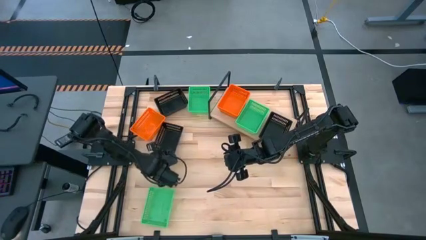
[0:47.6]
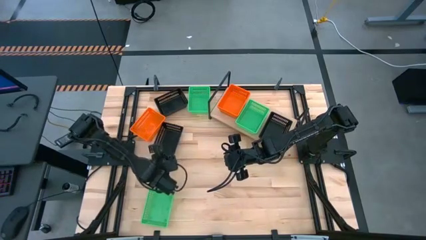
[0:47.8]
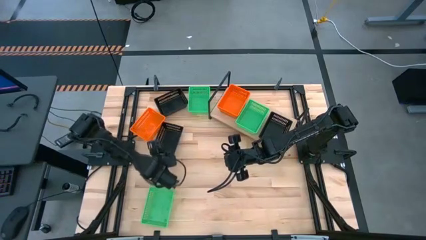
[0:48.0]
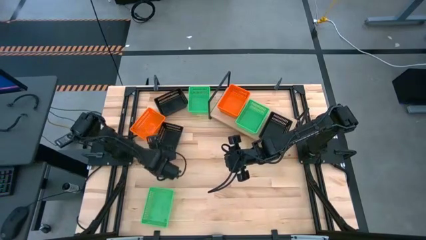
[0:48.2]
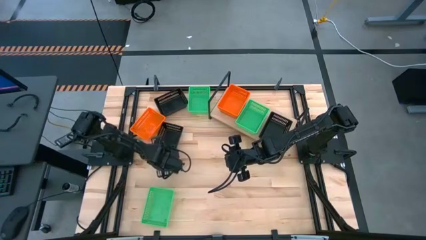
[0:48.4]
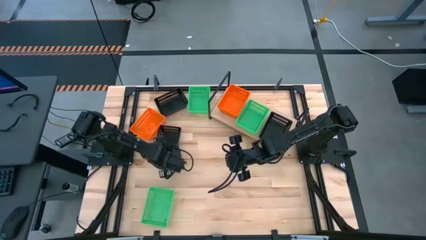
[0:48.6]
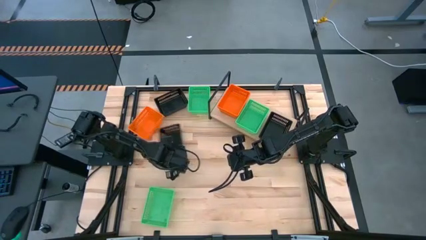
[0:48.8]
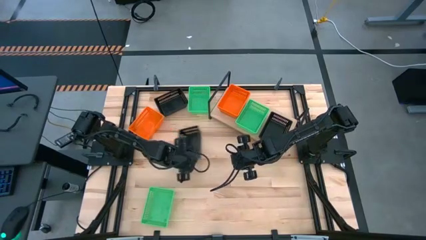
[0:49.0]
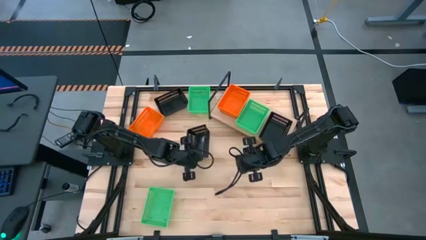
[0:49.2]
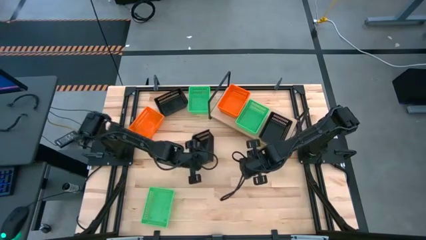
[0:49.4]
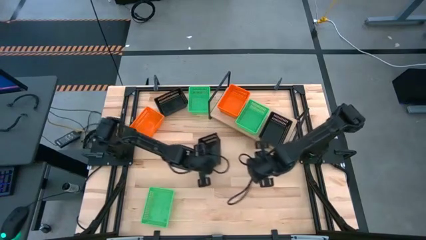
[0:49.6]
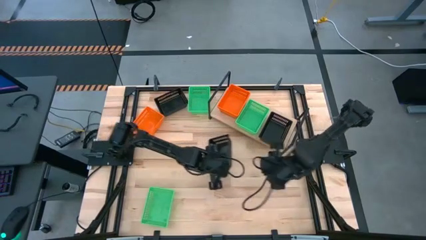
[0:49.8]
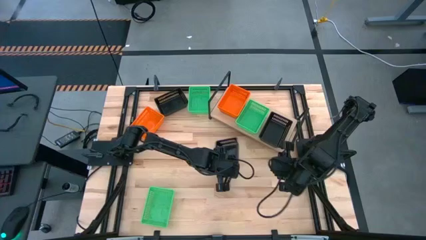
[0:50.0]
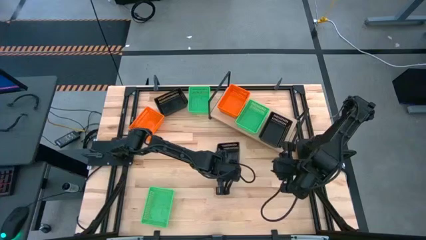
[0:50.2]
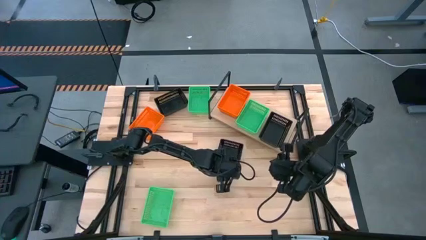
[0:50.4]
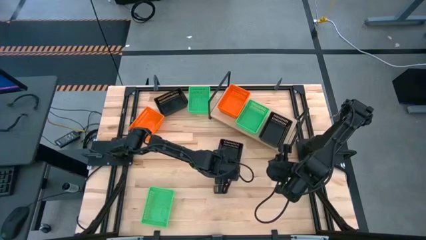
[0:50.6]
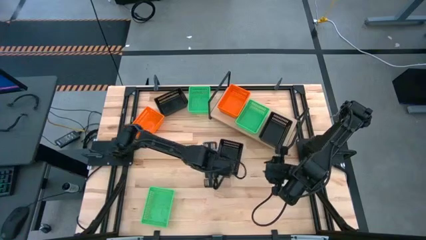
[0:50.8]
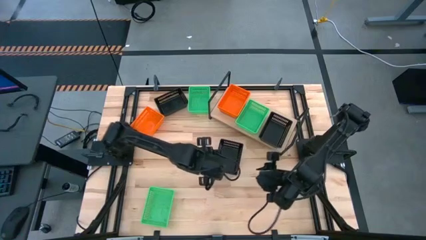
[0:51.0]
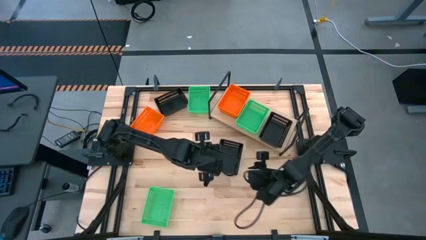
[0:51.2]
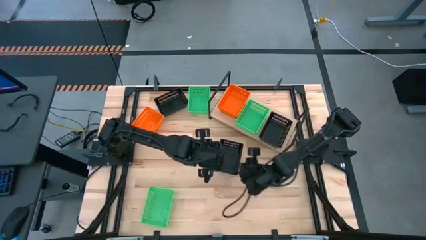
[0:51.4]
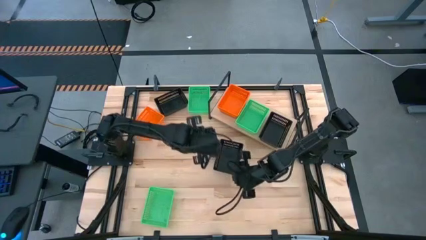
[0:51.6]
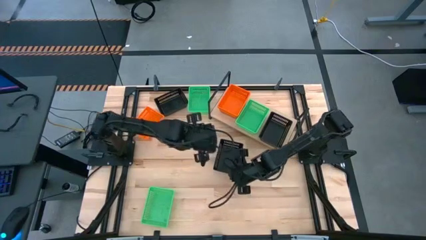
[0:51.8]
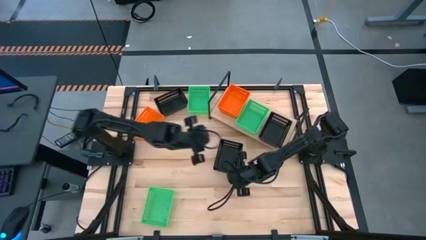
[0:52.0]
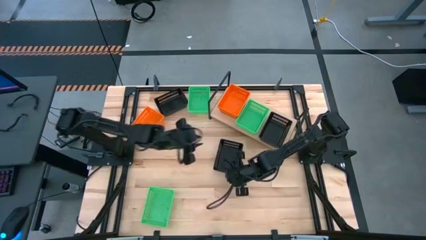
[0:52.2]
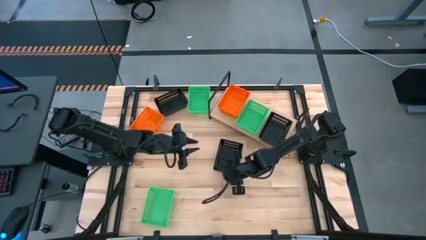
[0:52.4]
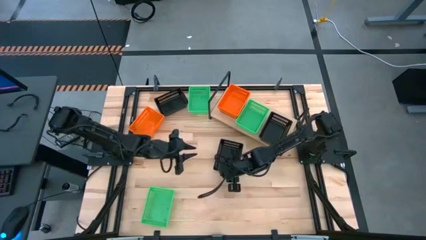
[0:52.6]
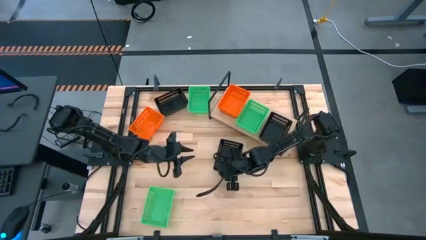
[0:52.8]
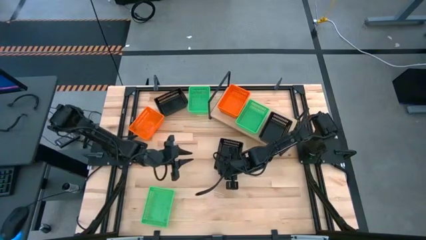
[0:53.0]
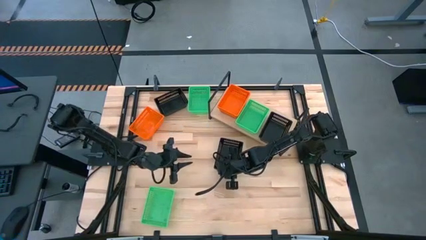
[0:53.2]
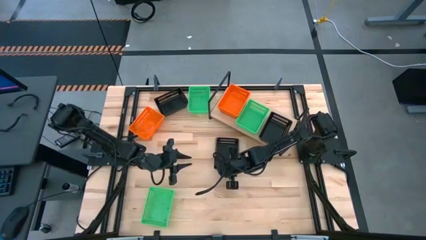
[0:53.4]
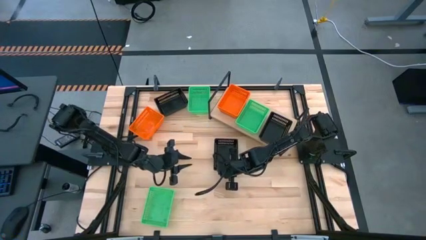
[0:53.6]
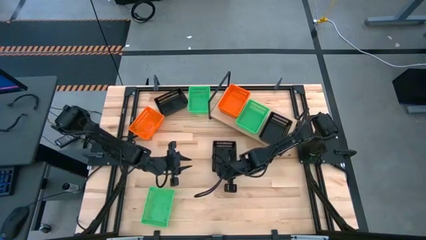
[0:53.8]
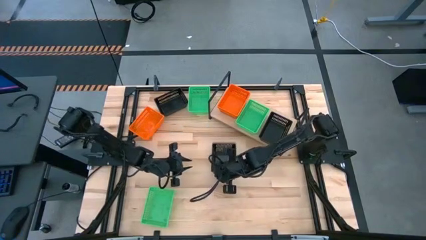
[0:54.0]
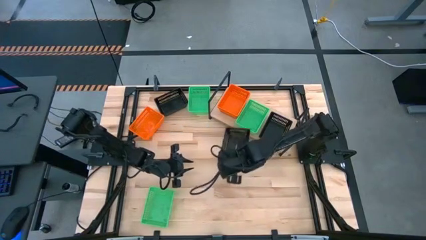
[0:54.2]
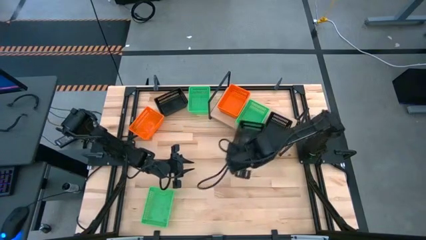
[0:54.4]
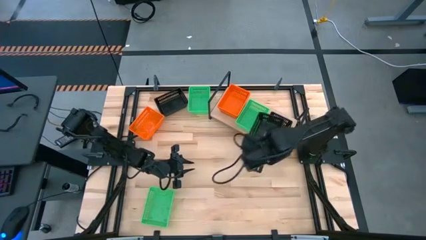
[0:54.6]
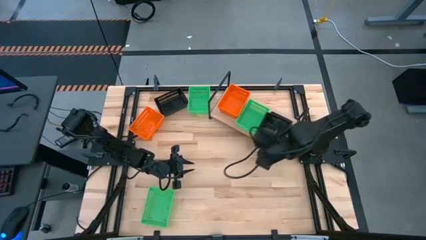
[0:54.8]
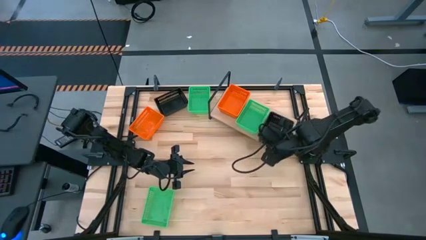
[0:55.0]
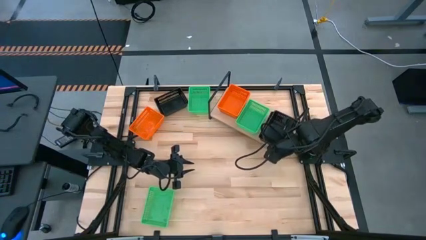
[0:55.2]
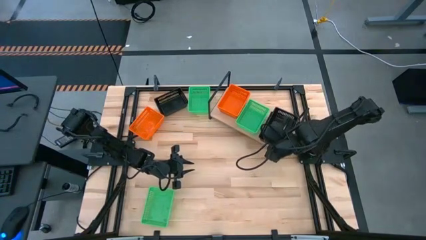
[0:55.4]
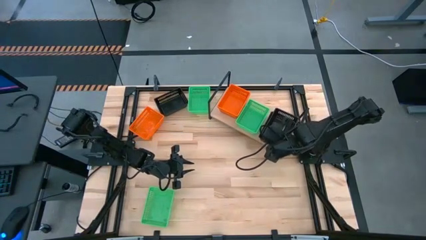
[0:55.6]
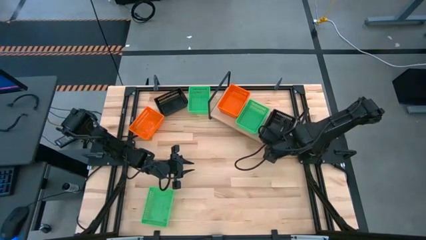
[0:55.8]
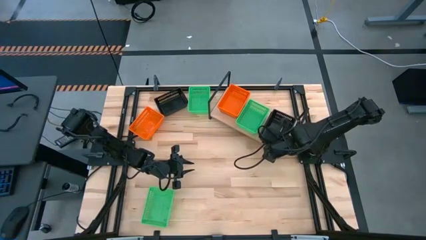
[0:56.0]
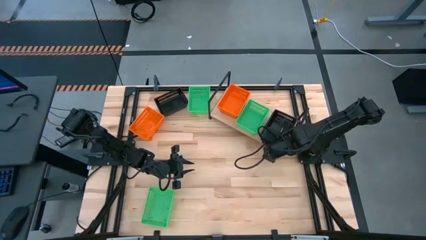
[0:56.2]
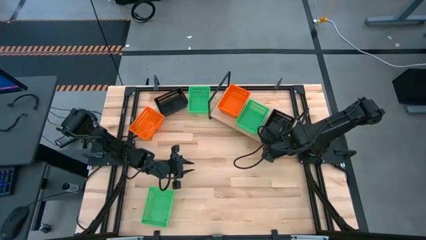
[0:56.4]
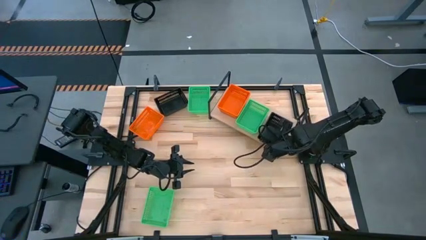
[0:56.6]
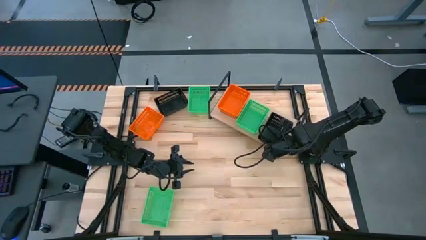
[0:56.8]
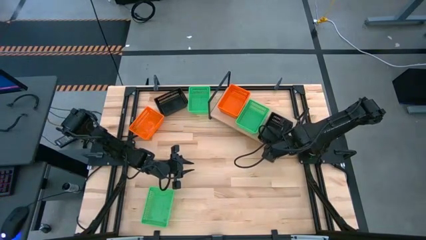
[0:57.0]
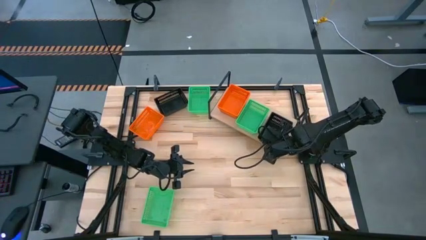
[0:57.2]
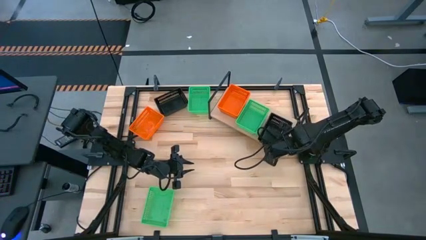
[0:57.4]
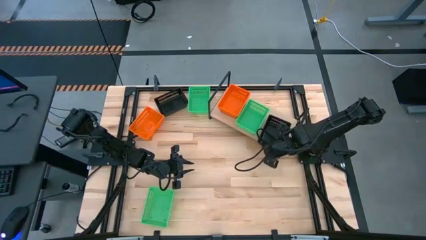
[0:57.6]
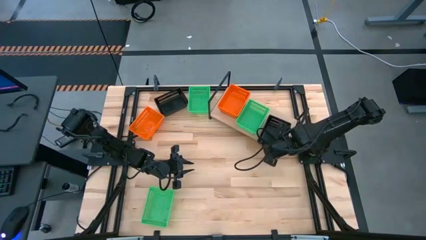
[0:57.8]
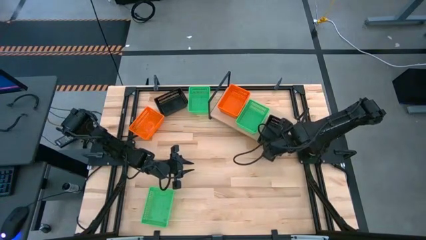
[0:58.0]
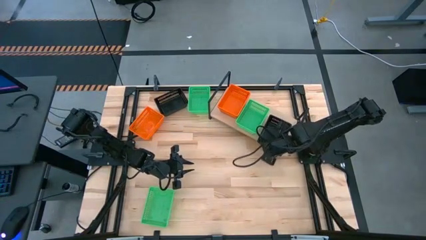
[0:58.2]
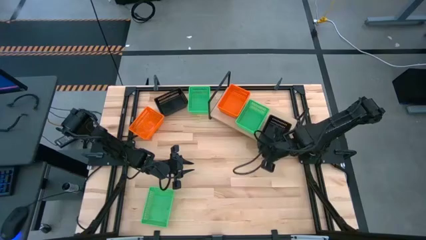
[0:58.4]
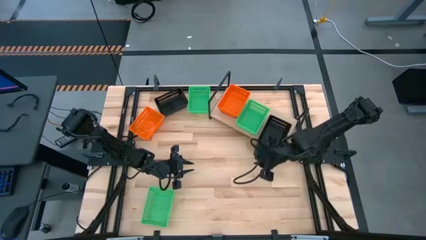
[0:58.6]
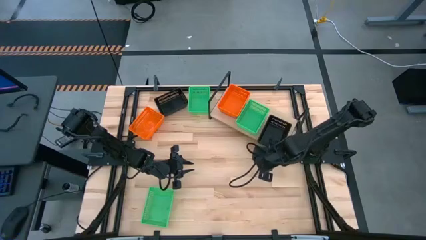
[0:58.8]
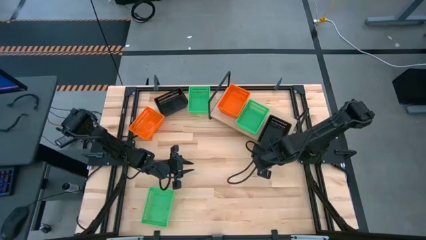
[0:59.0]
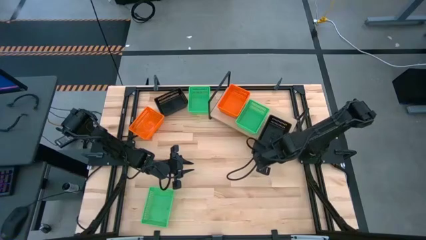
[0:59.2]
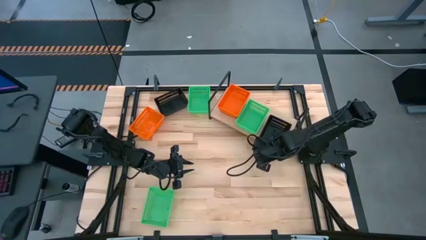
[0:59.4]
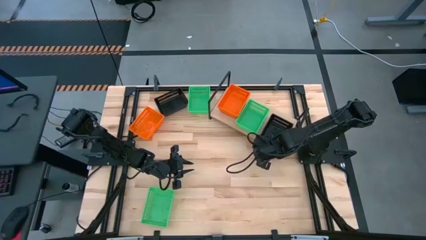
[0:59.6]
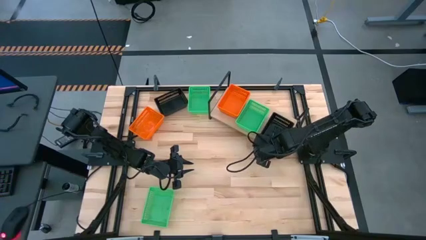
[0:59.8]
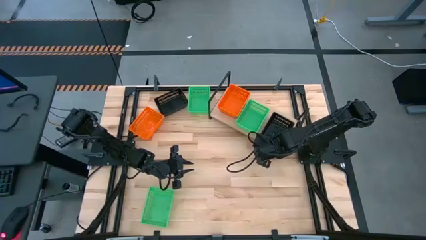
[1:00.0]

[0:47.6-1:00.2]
Task: Stack baskets on shelf by color
Stack the bottom black basket on top of the black basket on the shelf

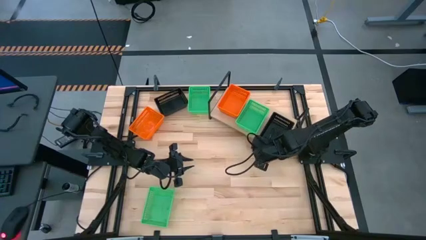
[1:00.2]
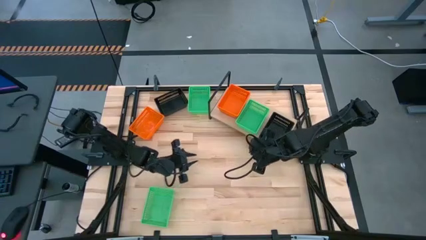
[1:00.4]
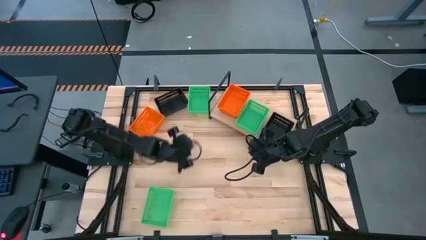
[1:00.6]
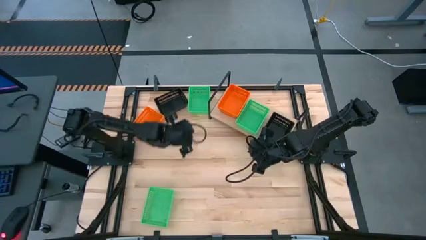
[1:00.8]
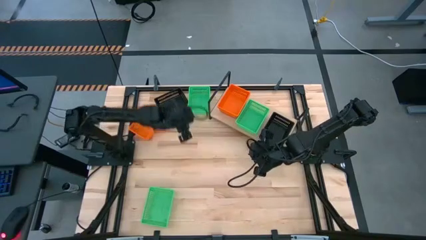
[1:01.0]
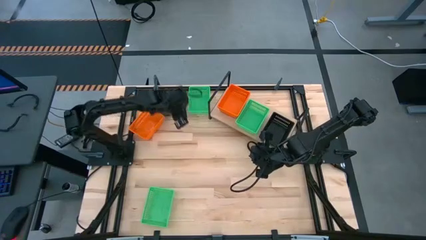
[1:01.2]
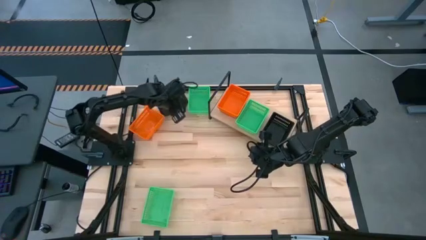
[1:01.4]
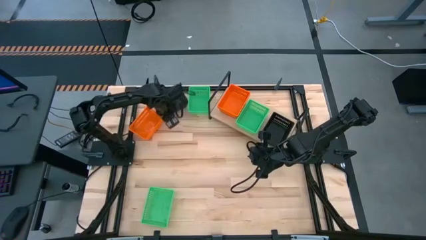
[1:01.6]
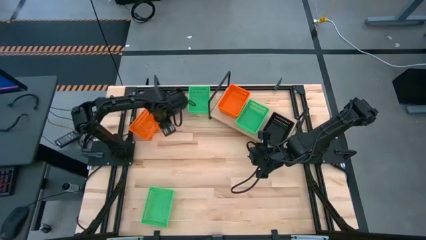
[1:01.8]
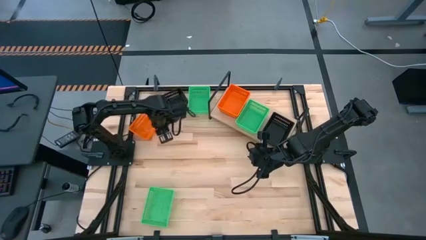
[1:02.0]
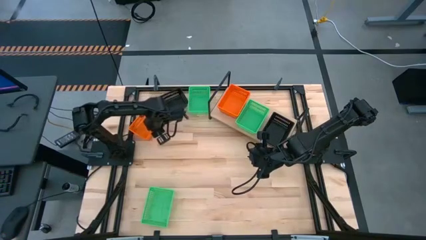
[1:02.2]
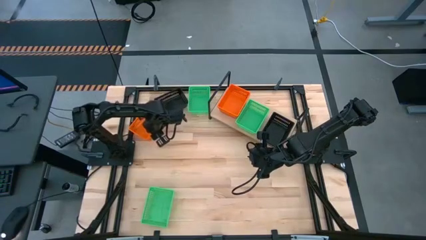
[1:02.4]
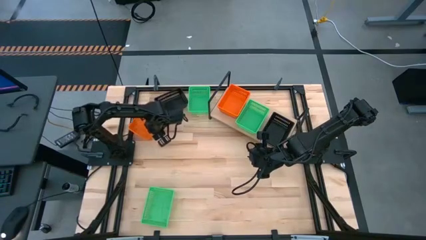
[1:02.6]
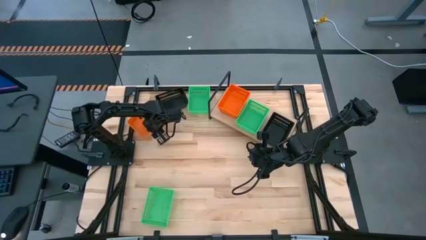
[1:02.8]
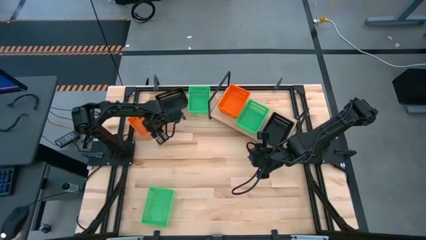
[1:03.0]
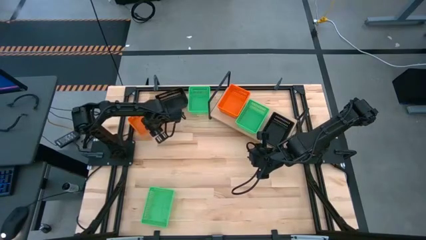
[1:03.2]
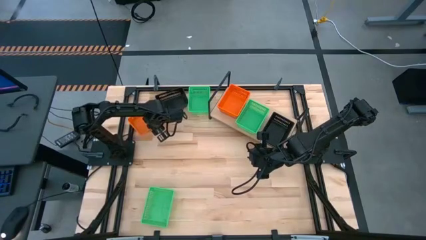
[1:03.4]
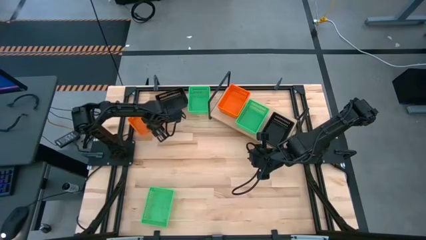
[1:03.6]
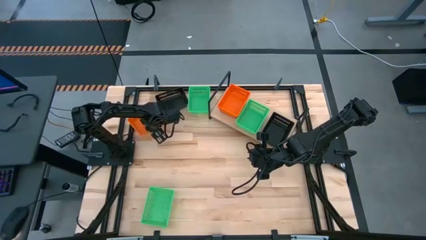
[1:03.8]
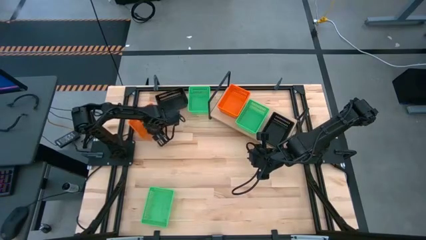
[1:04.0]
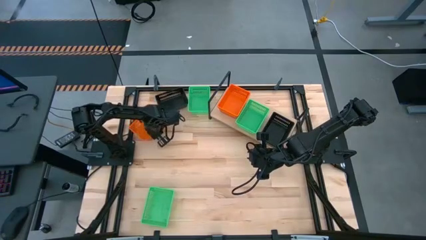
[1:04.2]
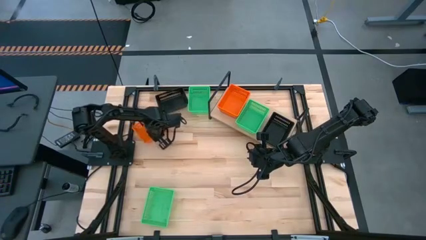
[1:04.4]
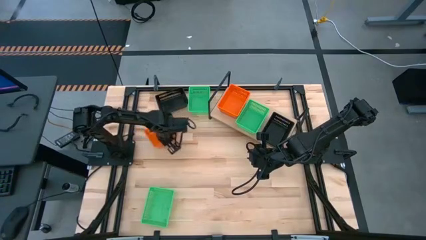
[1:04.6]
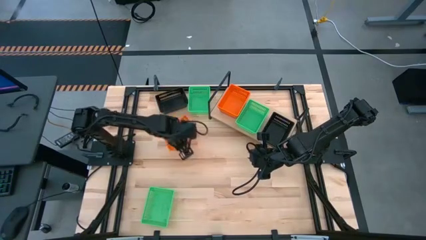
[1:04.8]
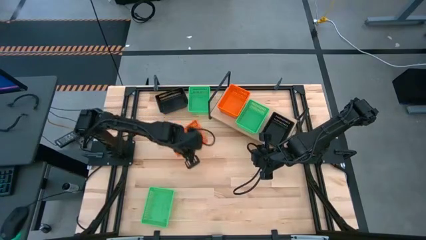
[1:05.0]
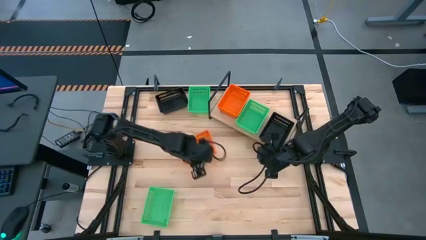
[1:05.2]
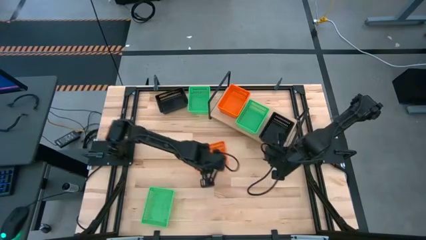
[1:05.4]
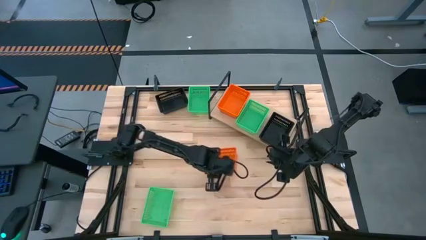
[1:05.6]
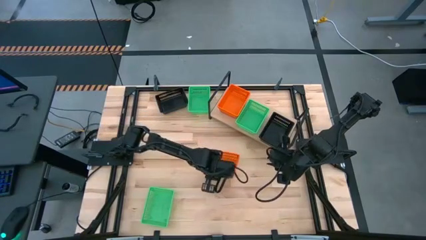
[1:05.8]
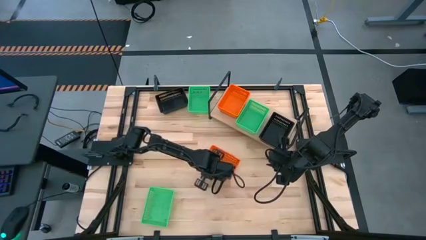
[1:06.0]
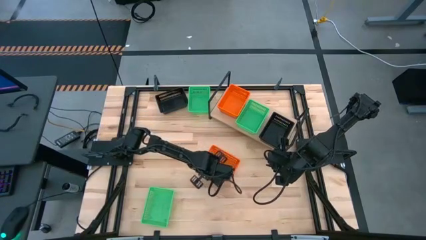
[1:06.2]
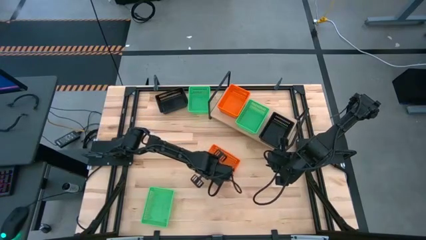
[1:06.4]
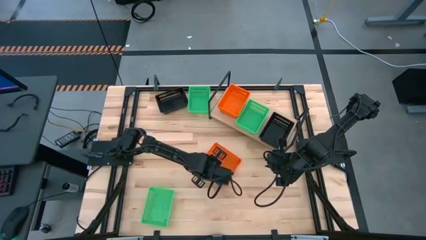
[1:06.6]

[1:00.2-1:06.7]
Move the orange basket to the center of the table
